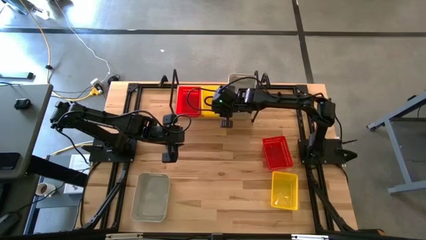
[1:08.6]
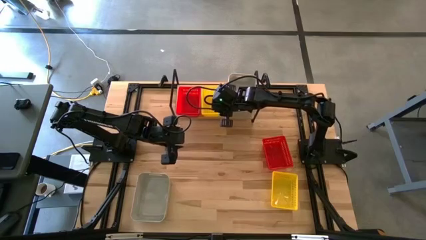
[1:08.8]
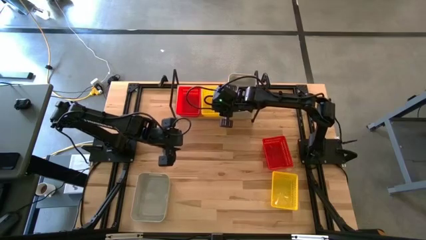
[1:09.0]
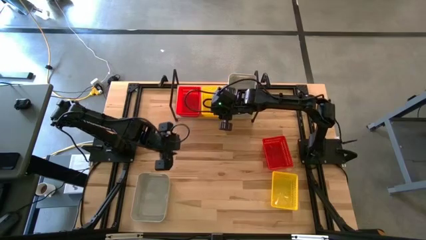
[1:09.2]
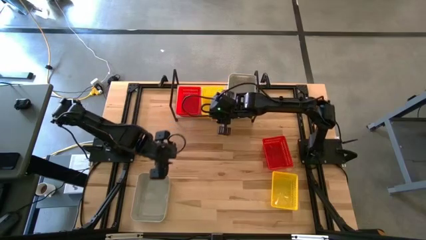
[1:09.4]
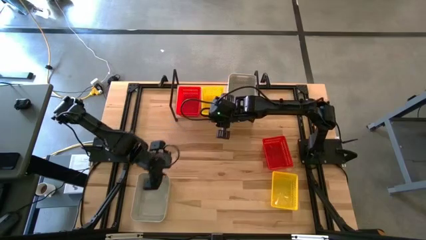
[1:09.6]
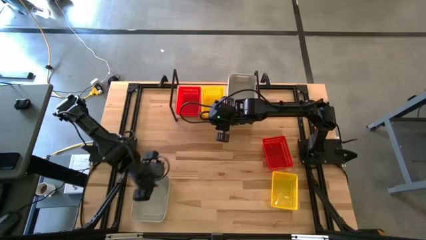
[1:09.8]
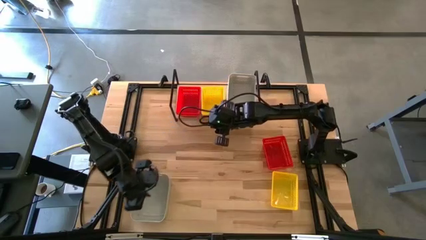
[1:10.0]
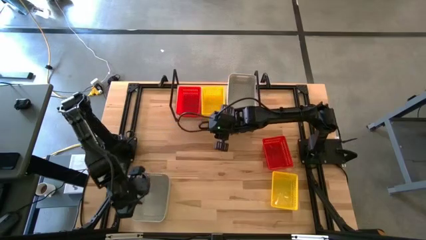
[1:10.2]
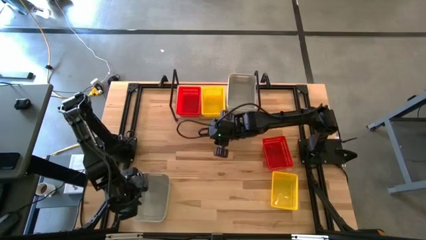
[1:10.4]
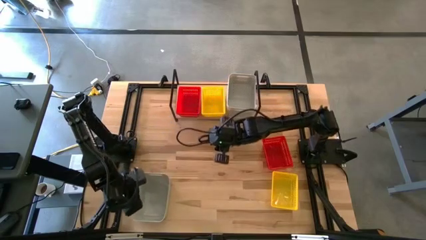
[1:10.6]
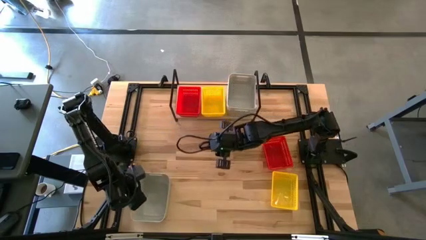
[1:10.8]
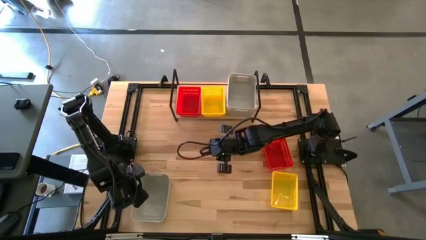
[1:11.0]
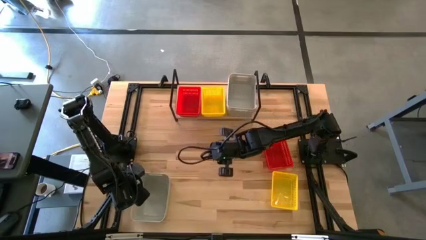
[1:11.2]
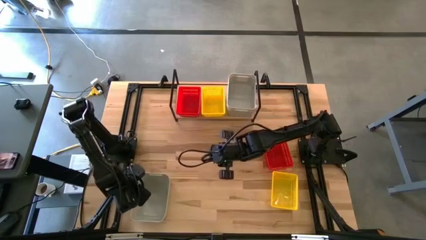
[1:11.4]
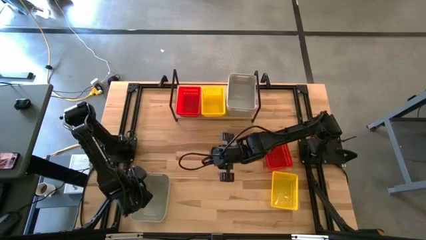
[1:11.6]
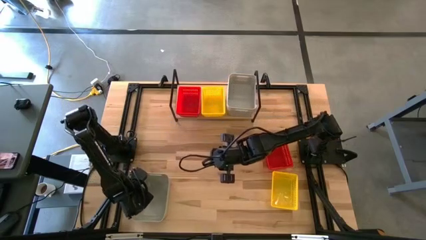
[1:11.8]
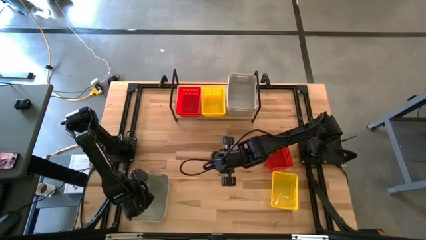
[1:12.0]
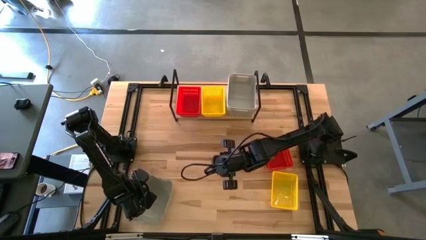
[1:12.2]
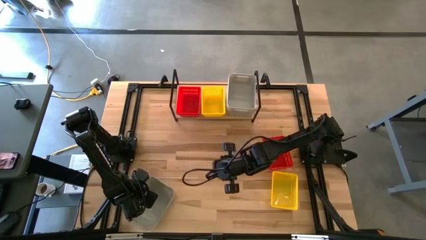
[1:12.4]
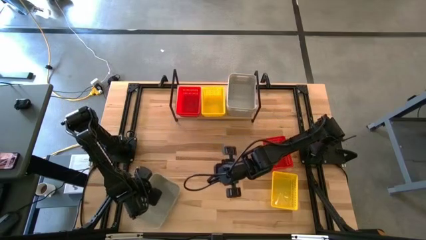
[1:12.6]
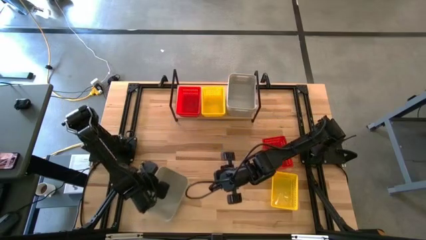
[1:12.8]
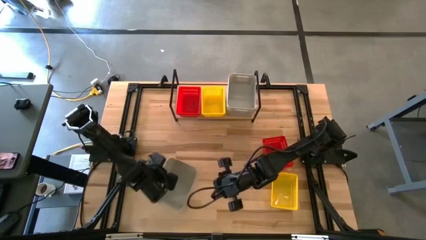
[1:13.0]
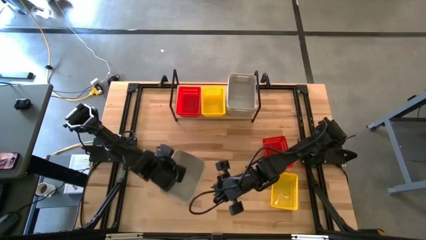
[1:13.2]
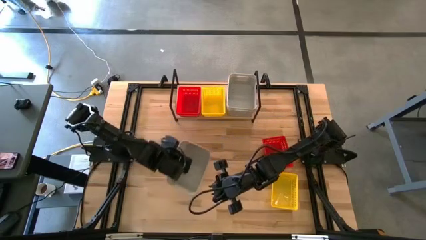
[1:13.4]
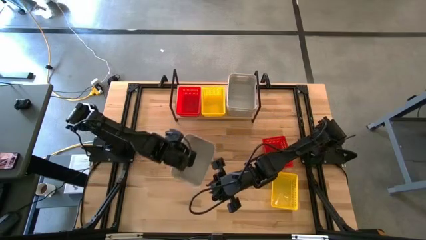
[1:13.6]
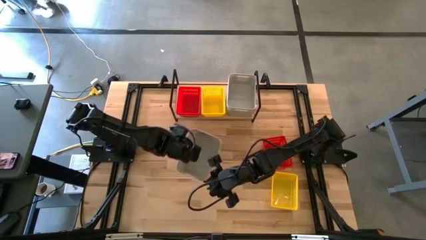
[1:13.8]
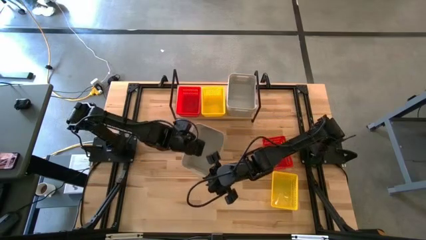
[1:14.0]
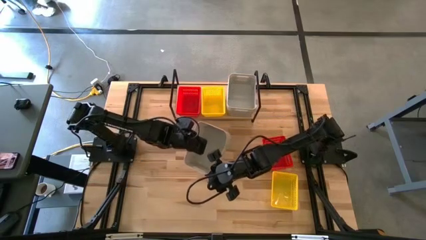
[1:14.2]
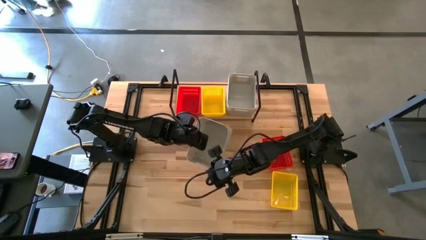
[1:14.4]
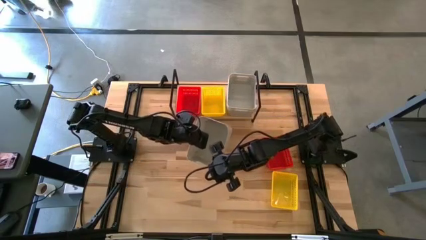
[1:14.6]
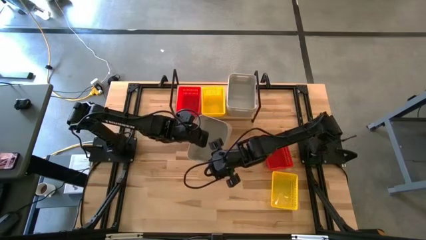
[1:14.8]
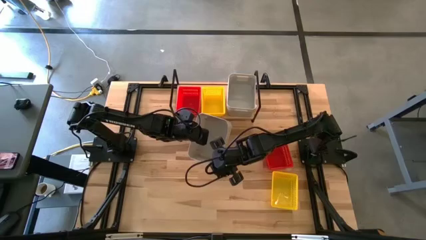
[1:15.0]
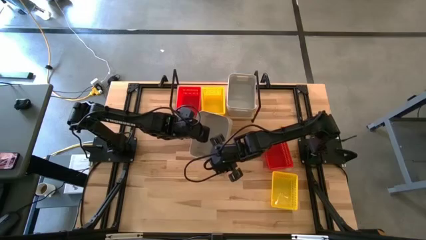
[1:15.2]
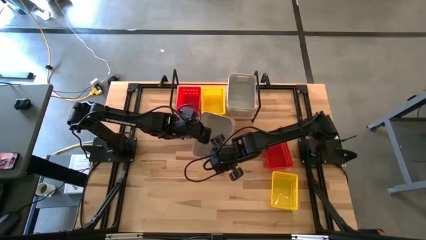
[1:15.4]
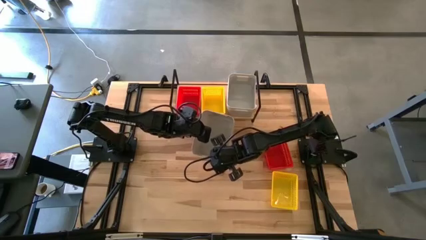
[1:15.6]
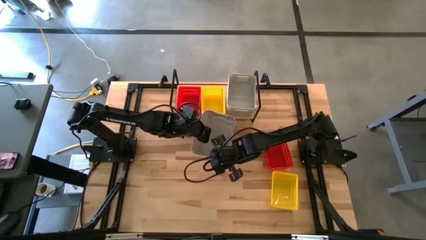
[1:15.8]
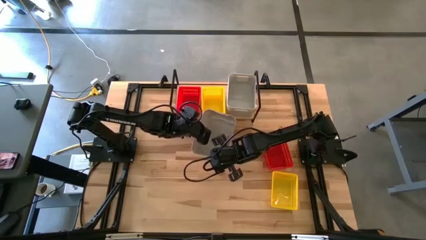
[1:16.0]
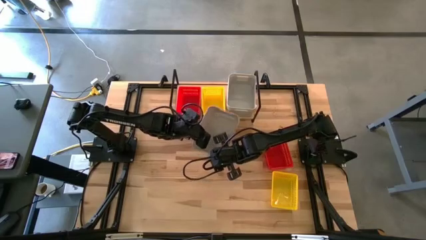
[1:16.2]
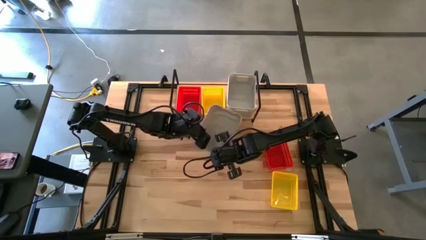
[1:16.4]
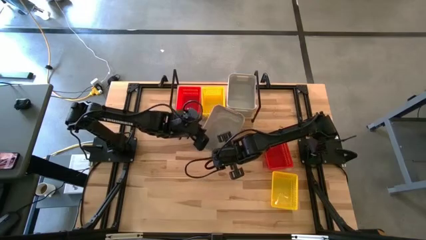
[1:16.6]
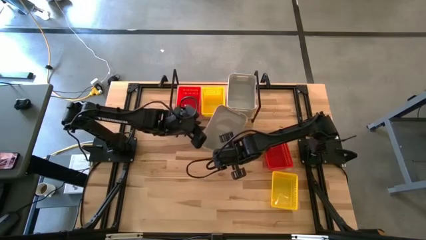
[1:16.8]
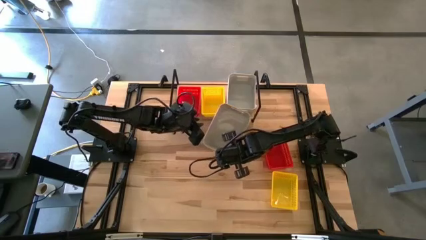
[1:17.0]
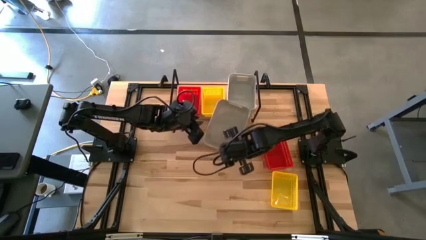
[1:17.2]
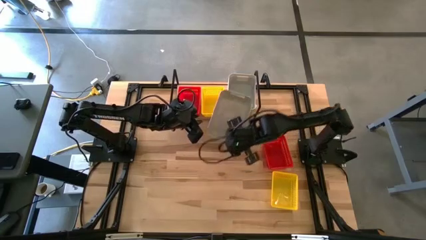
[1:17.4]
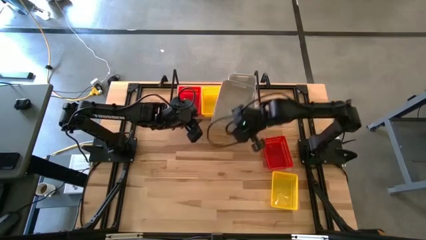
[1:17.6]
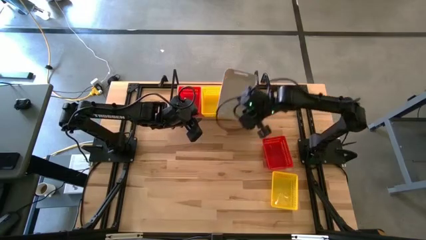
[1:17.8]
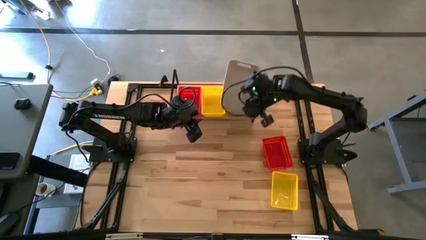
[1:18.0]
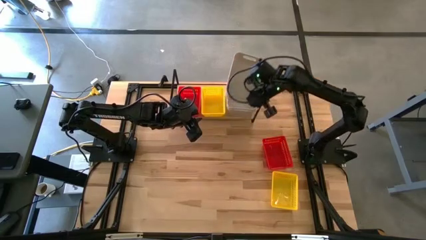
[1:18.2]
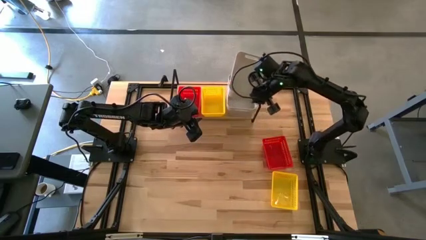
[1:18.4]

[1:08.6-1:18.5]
Task: Stack baskets on shelf by color
Stack the gray bin on the gray bins on the shelf

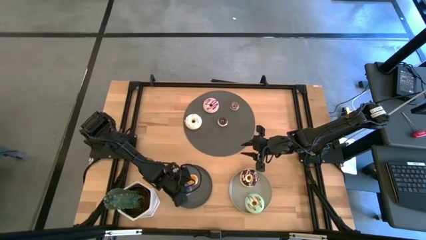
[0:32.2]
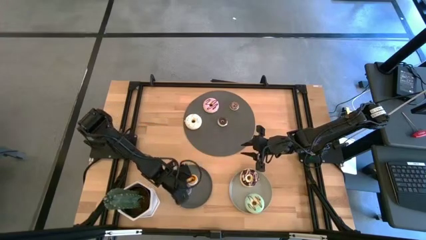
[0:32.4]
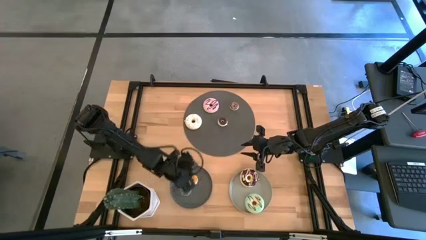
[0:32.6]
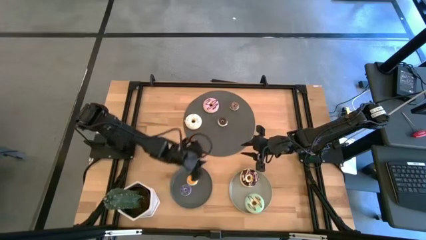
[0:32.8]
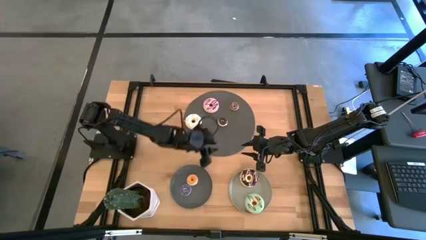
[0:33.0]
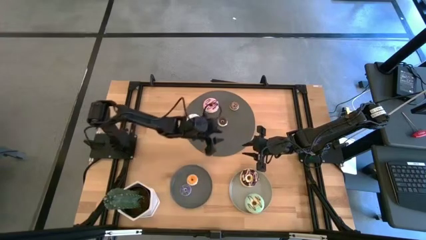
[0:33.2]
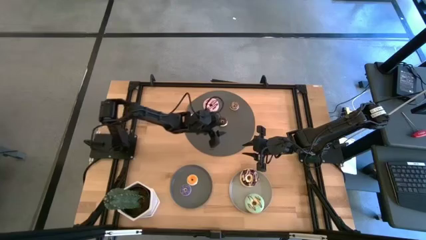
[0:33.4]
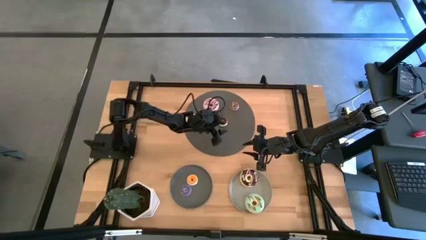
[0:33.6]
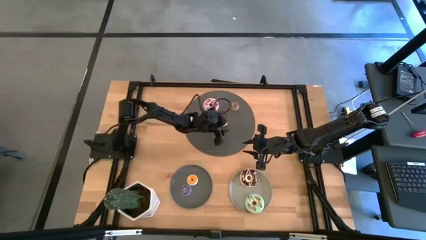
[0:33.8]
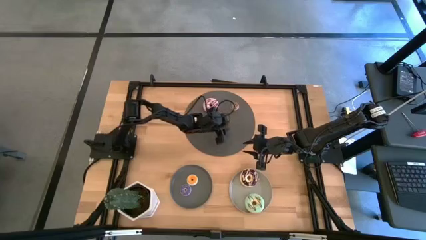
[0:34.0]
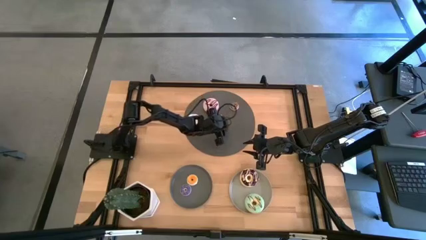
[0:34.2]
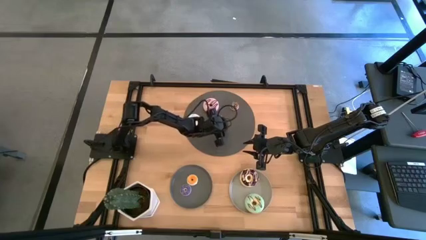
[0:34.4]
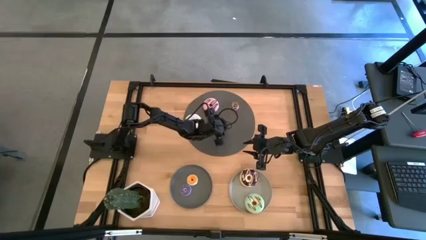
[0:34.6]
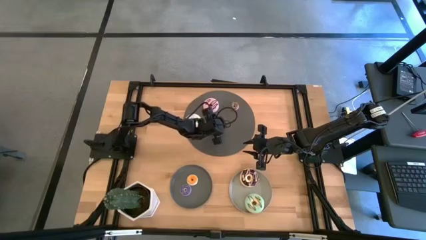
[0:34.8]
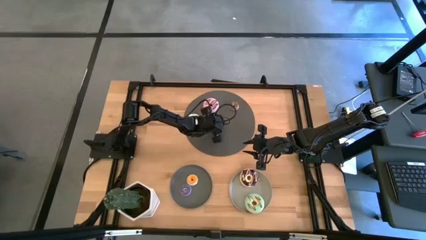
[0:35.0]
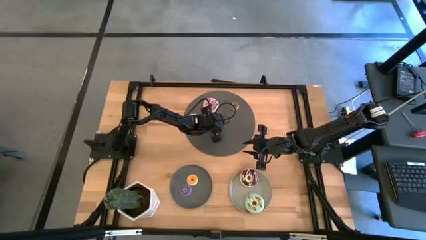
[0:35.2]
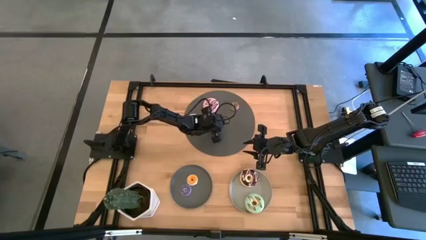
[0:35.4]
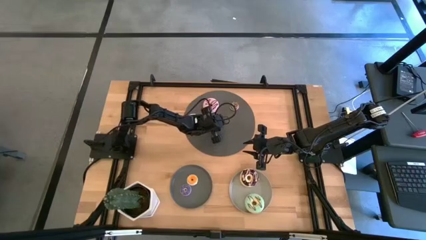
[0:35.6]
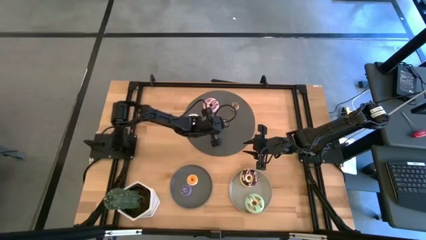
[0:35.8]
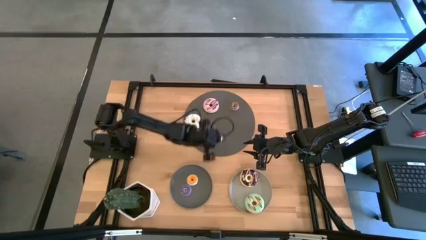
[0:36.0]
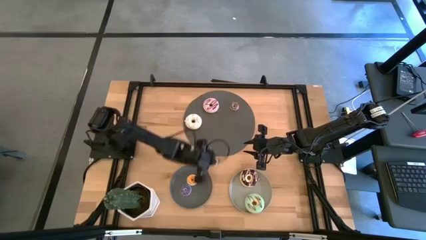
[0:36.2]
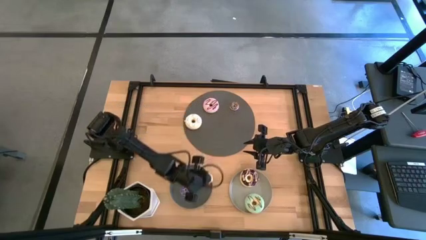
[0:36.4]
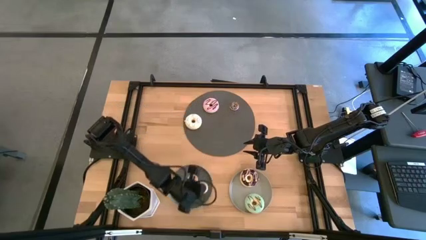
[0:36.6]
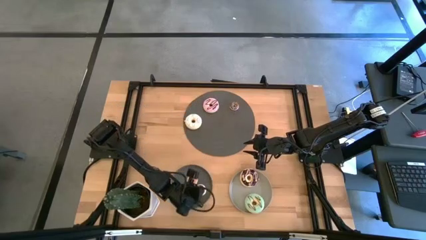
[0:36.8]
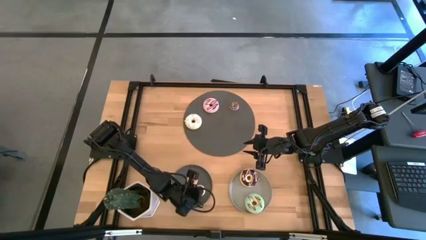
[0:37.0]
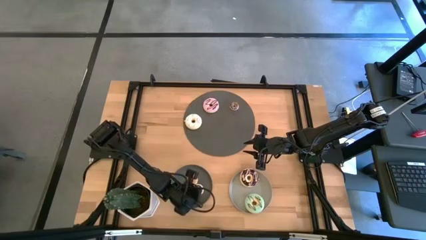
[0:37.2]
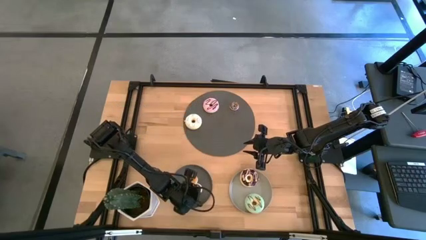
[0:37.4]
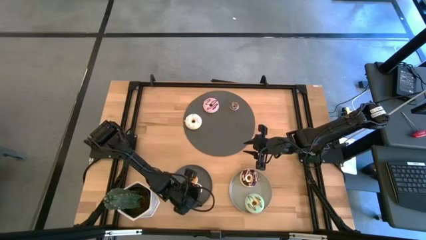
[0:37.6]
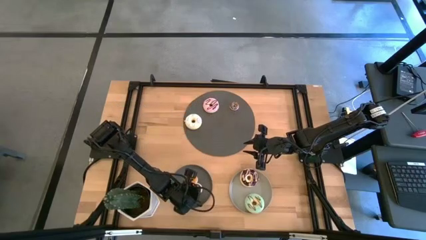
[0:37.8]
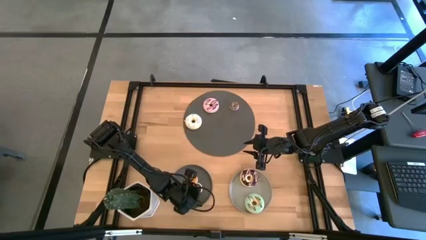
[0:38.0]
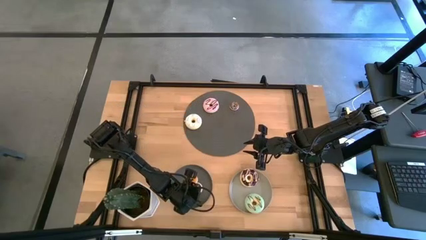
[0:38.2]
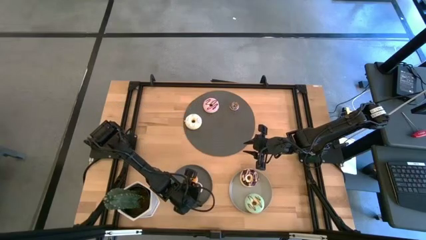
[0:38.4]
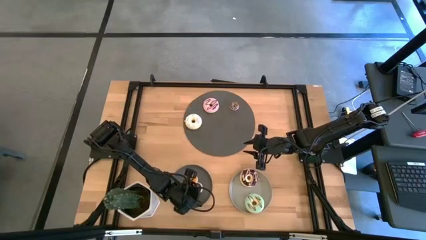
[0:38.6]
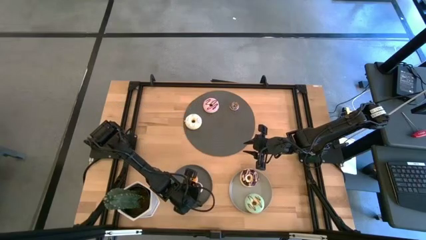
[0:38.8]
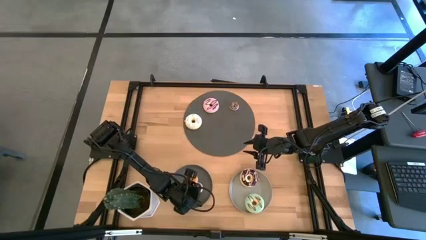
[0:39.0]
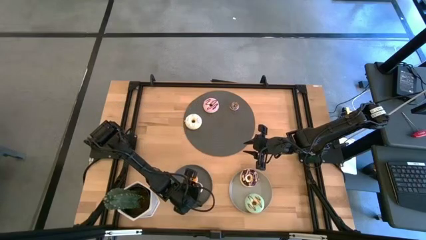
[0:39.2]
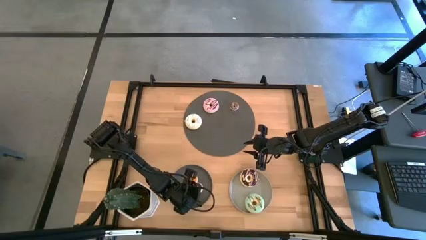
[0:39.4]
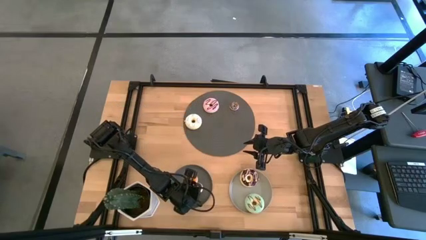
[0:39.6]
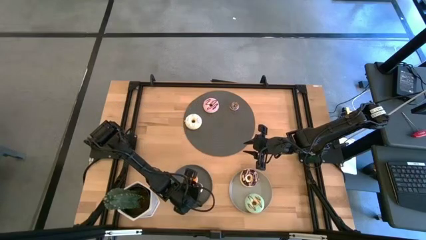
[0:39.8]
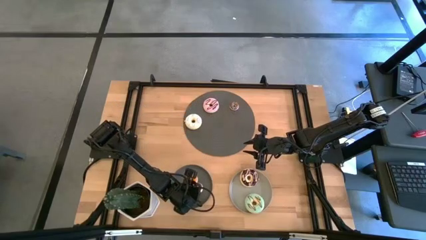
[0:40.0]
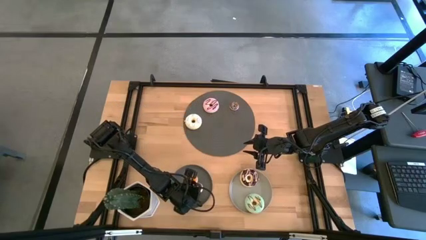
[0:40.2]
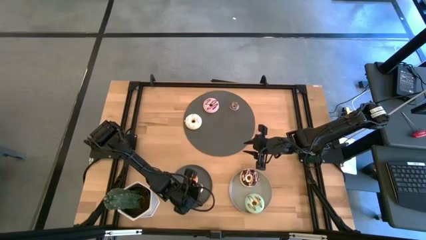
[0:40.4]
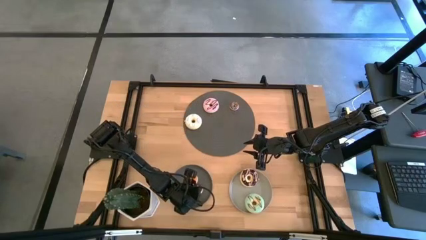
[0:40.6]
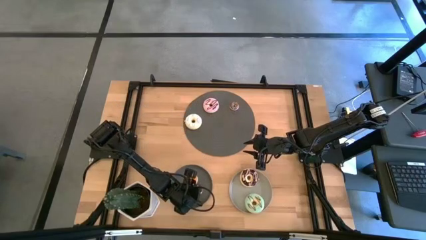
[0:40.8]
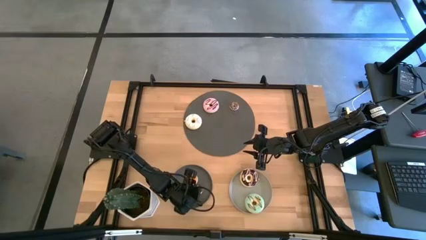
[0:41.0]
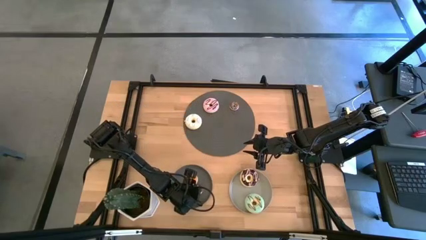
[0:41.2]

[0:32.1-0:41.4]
Task: Pick & Place donuts
Put small black donut on the black plate
